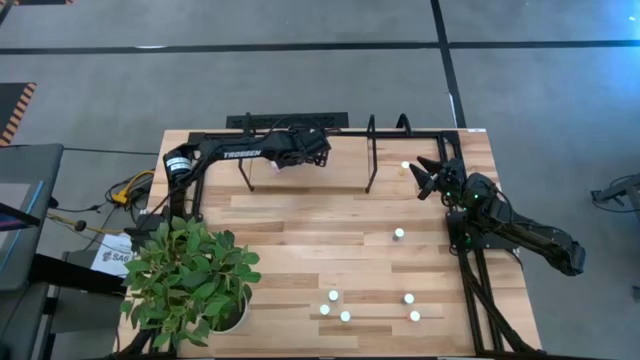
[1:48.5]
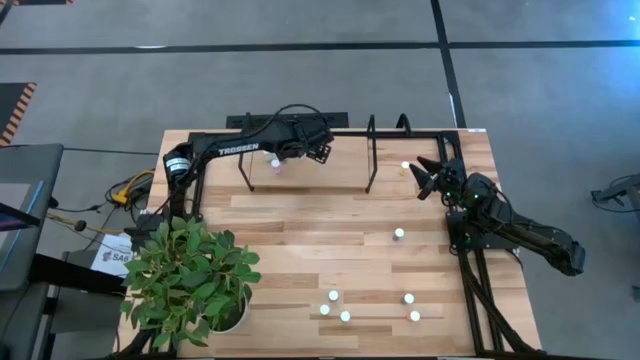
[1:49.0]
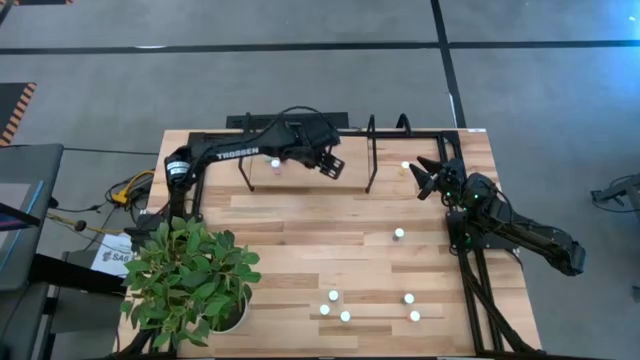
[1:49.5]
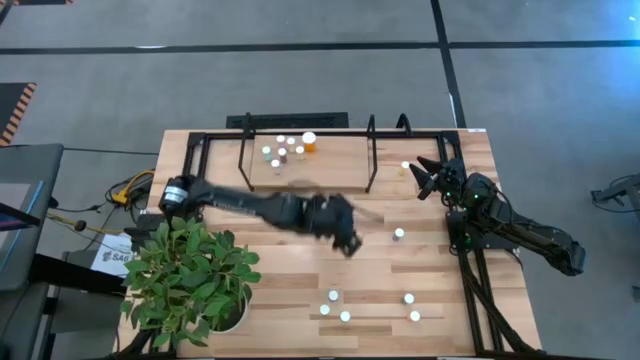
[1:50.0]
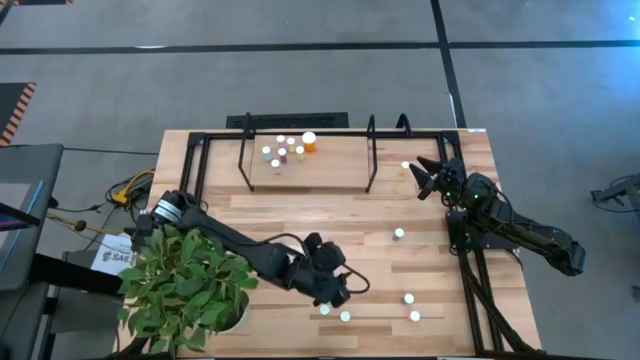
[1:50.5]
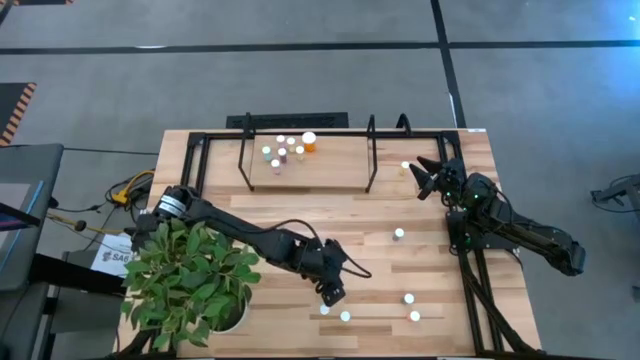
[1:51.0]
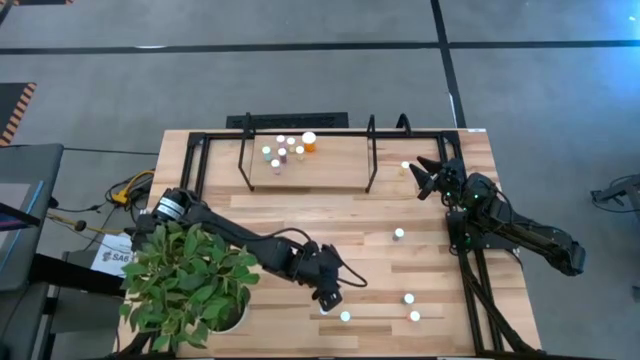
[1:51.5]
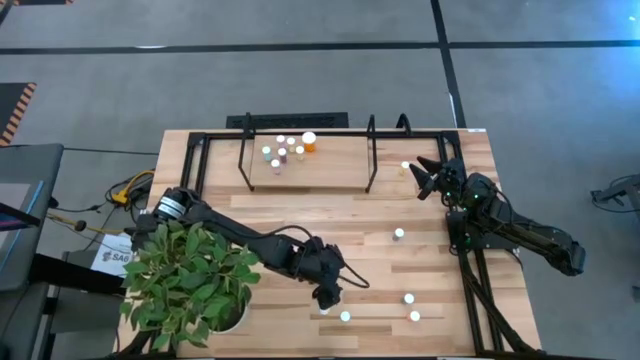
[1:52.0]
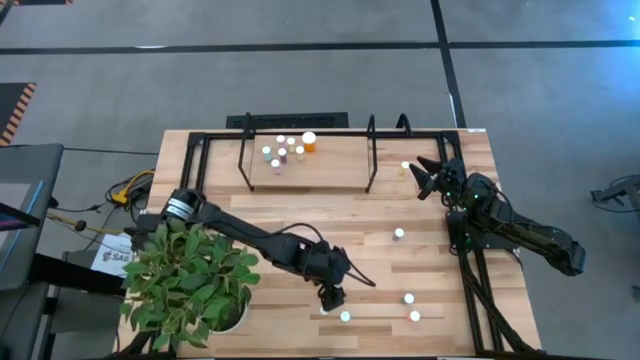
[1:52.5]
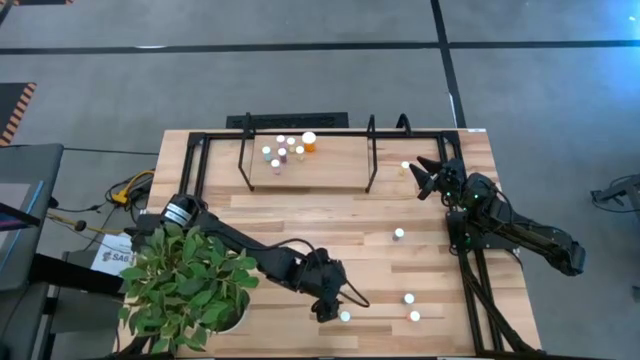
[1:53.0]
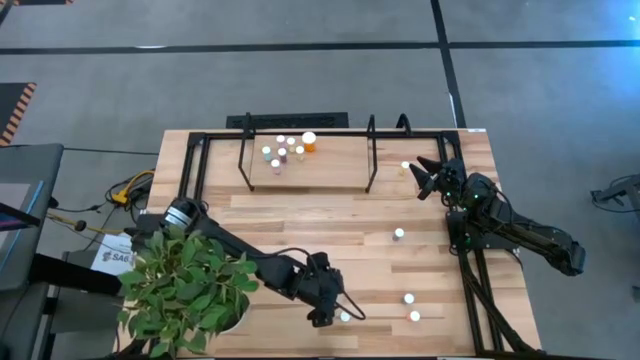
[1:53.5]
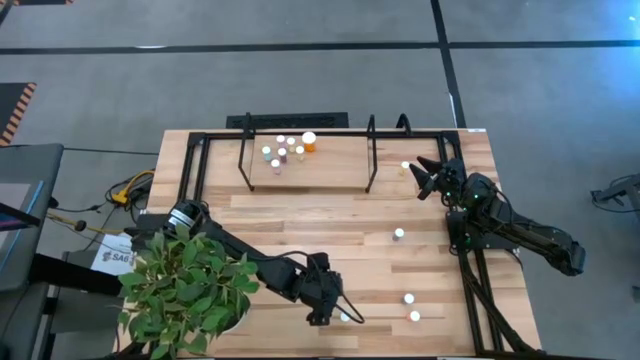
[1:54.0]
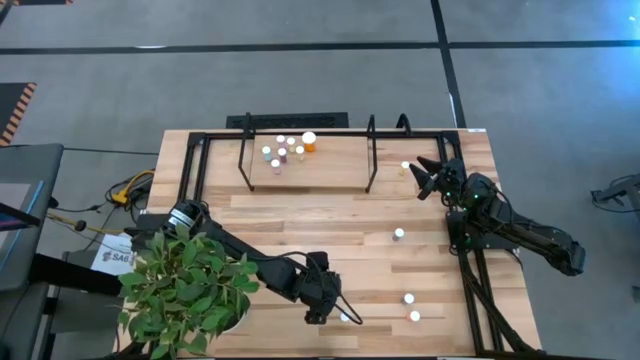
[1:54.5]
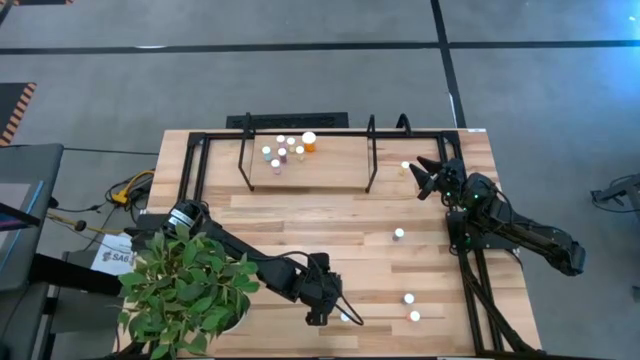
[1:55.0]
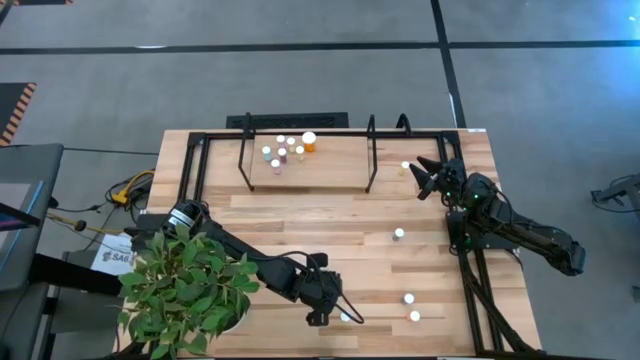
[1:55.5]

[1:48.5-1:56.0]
Task: Pick and place medicine bottles onto shelf by color
Put the blue pill bottle on the shelf

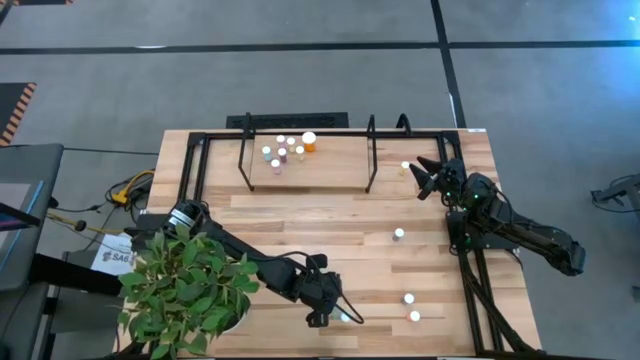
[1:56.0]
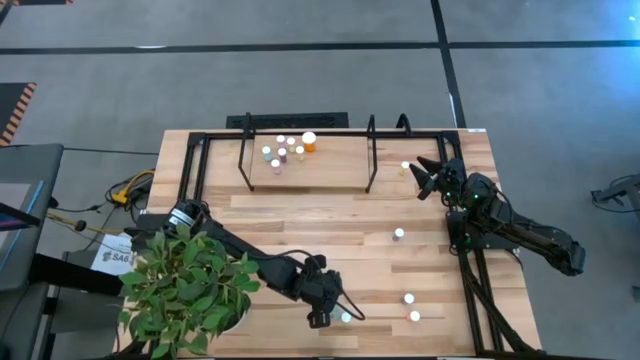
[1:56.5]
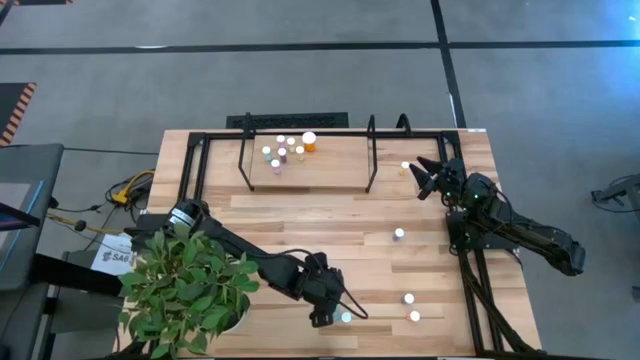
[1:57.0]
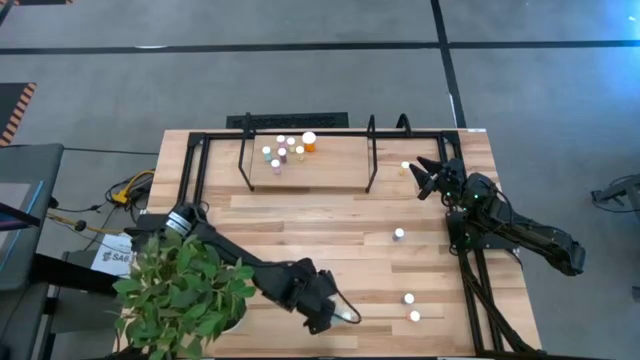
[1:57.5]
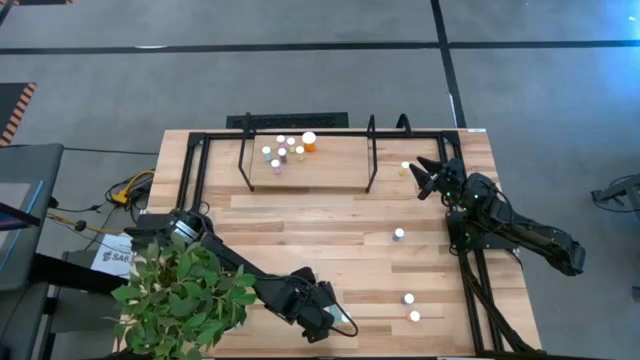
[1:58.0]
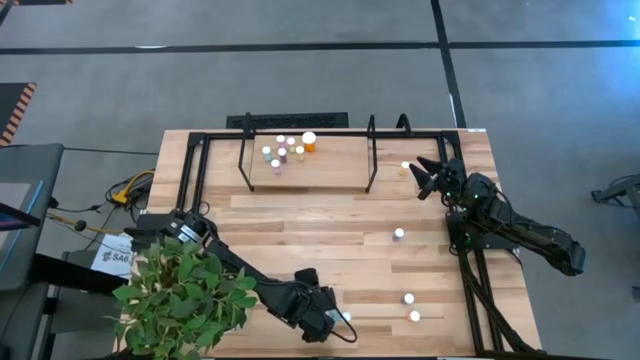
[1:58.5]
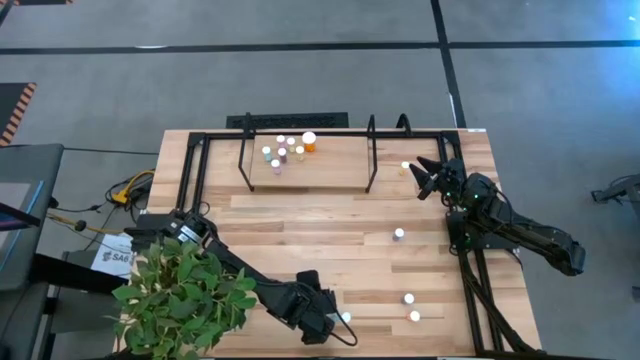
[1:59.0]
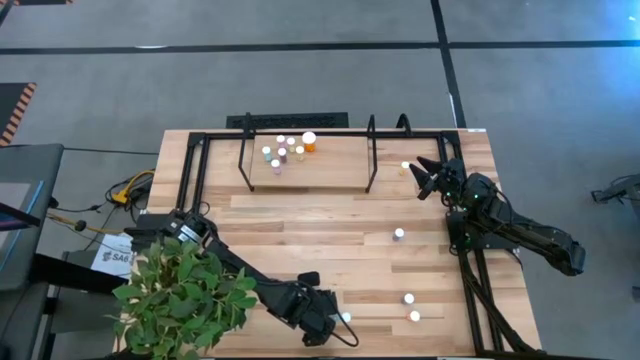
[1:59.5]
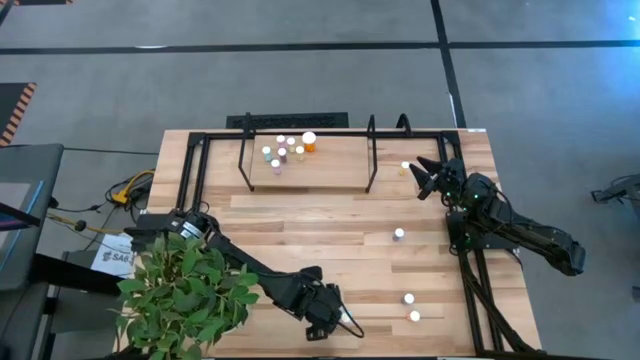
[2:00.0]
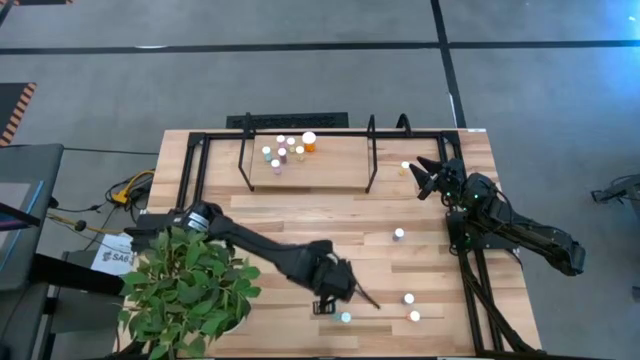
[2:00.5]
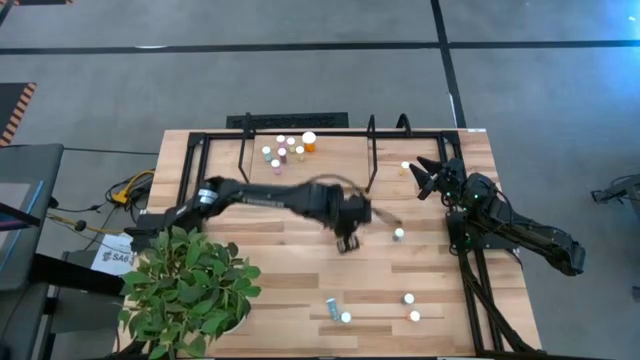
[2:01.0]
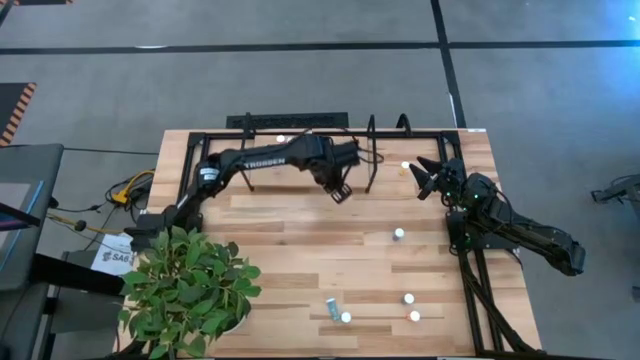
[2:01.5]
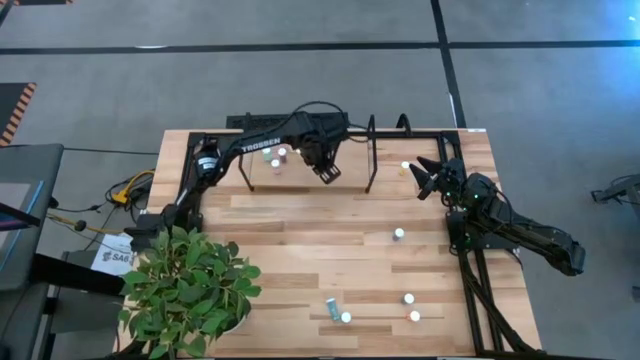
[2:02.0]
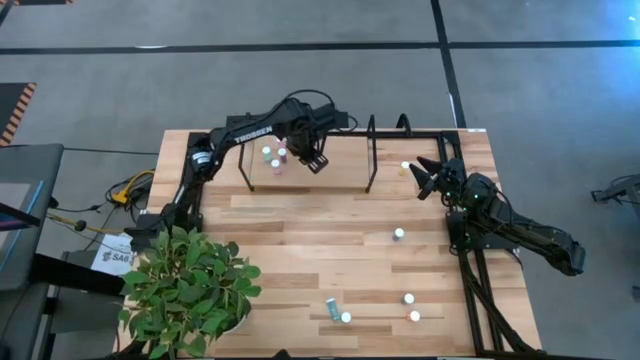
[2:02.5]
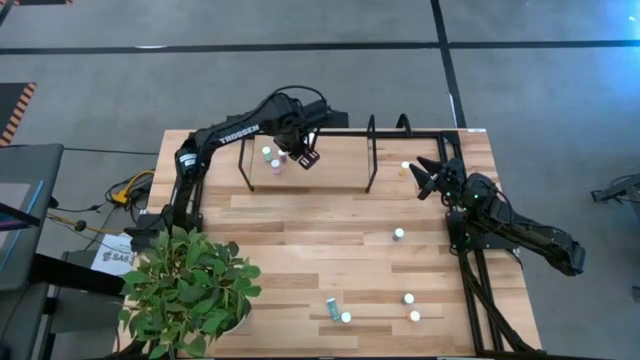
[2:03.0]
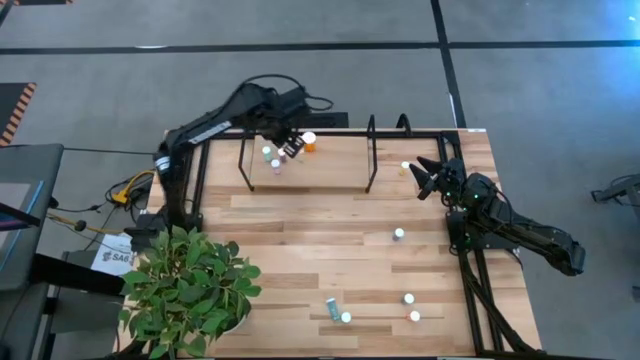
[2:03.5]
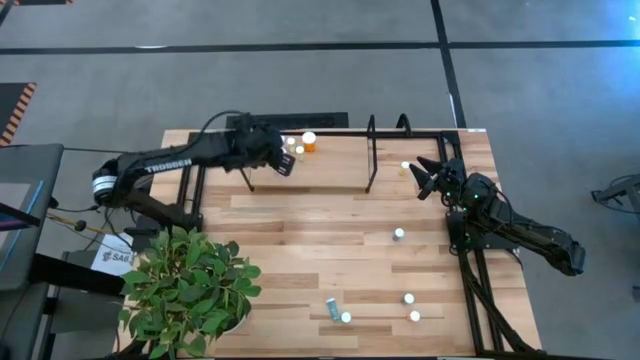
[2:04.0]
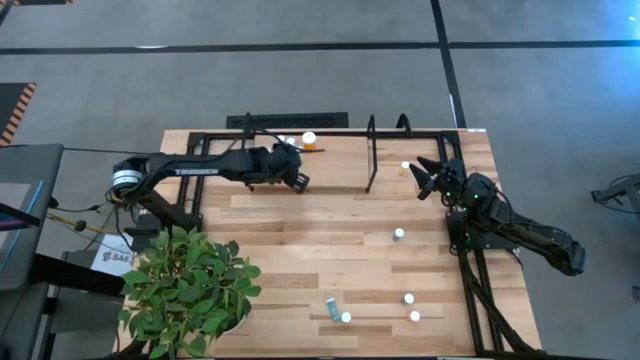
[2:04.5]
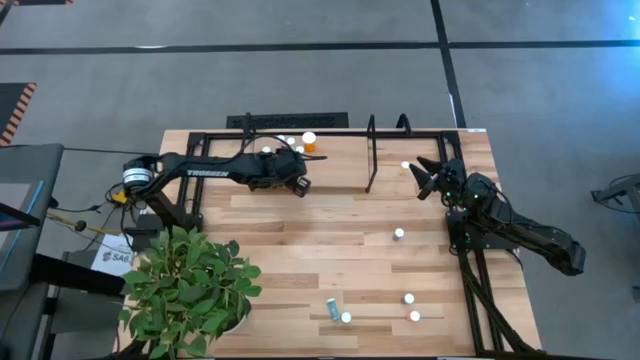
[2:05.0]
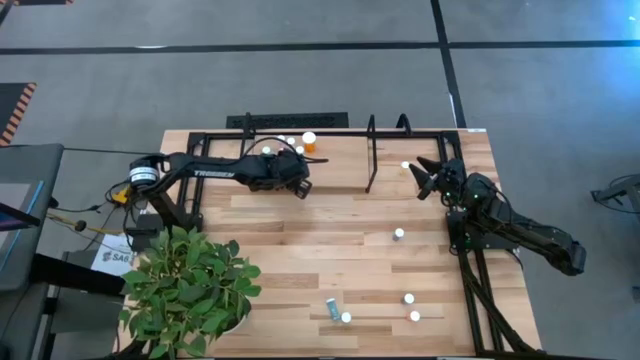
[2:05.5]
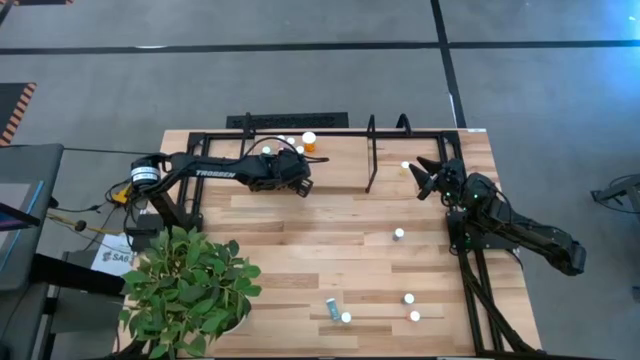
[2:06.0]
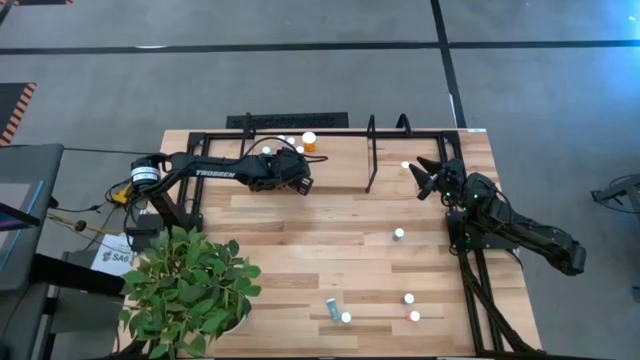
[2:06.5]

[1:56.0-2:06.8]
Put the yellow pill bottle on the shelf

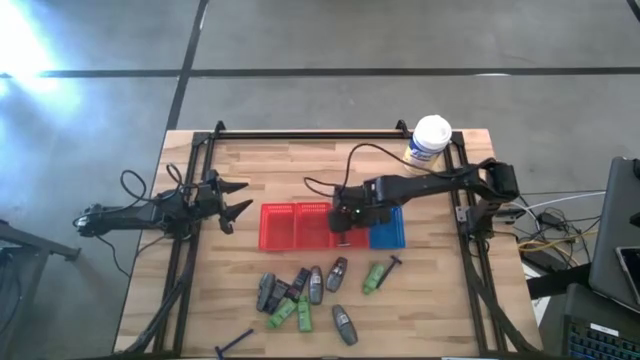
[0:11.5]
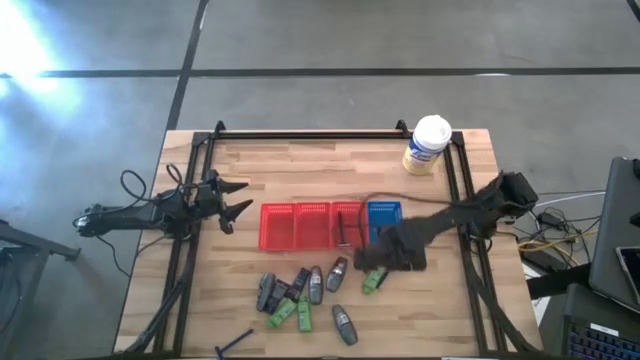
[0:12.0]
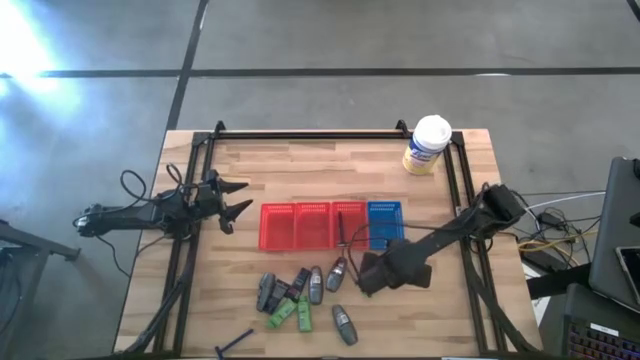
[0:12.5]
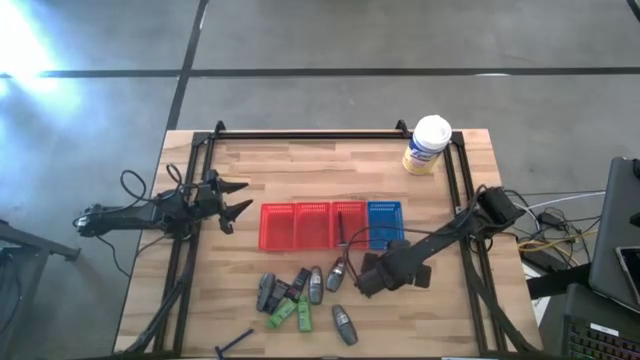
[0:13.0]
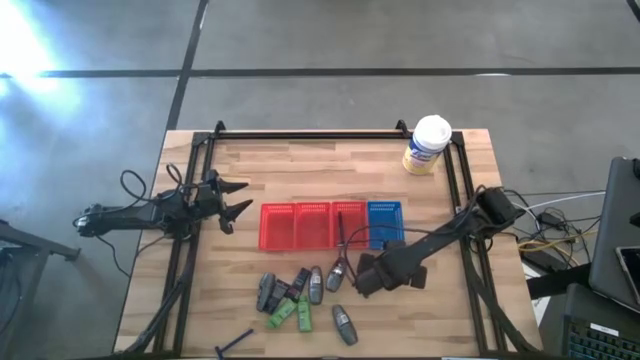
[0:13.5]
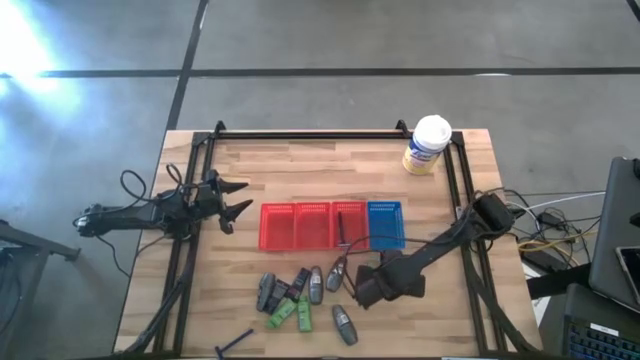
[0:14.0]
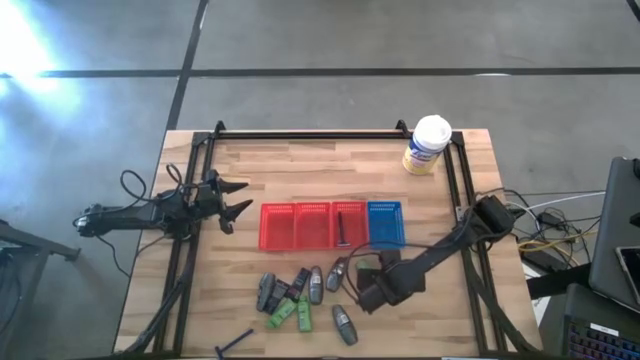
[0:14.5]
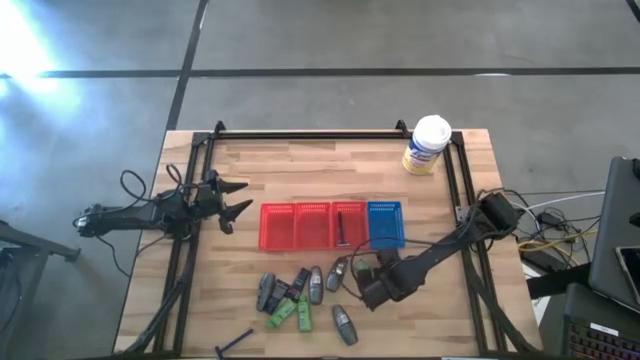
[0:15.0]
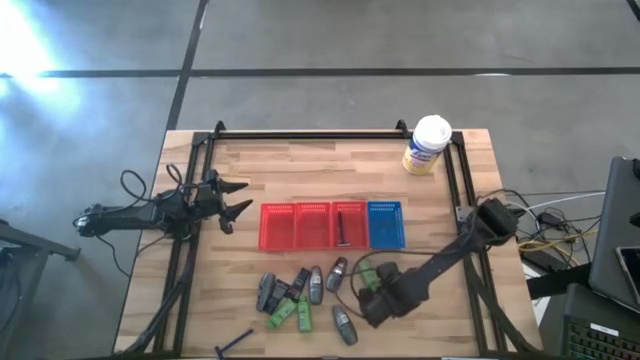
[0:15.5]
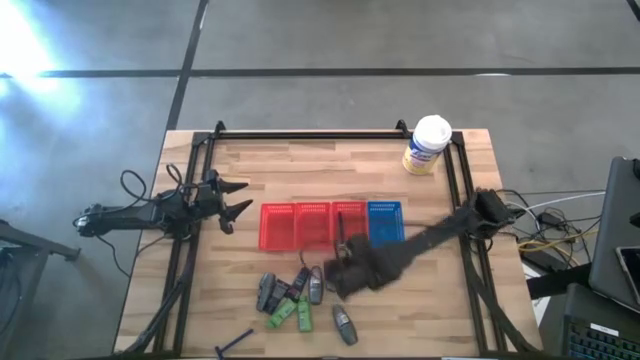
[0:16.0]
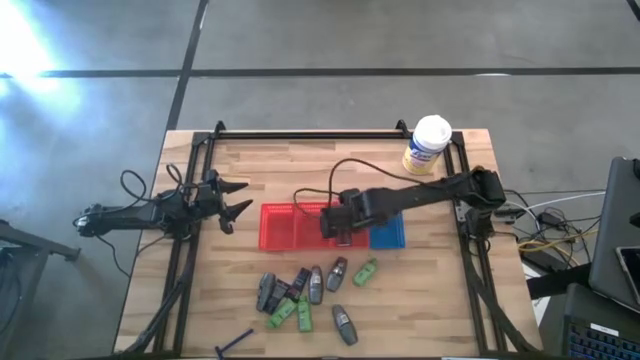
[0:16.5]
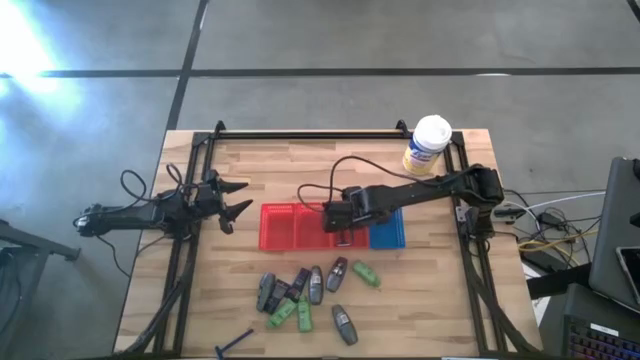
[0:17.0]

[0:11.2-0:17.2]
Task: Pick & Place Travel size toiletries
Put the blue razor into the right red bin
